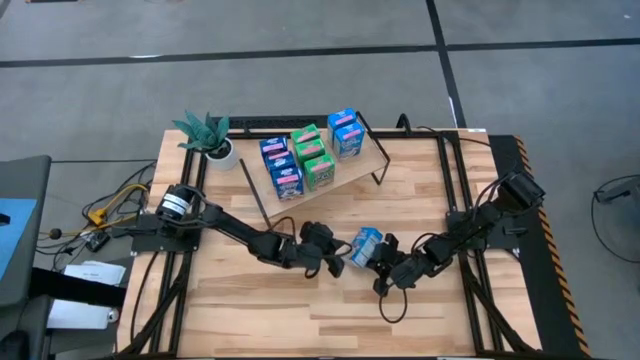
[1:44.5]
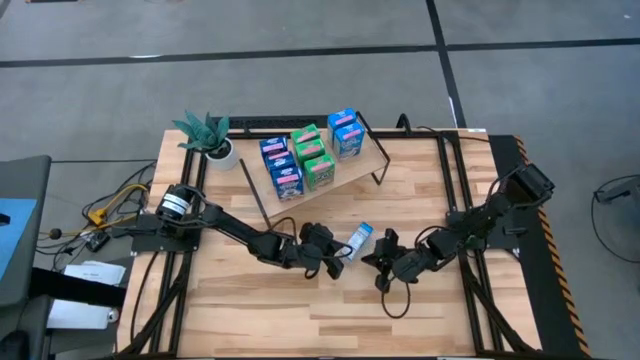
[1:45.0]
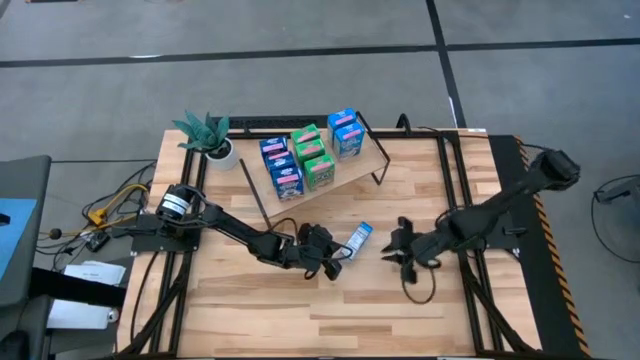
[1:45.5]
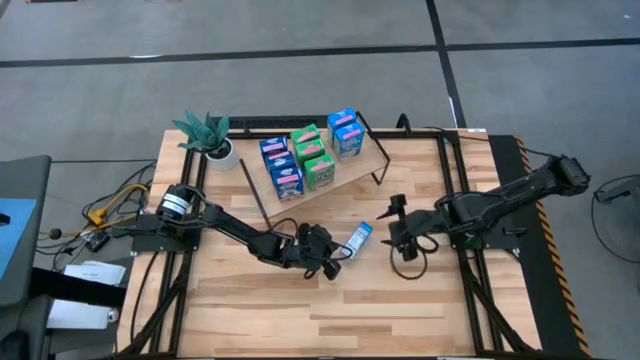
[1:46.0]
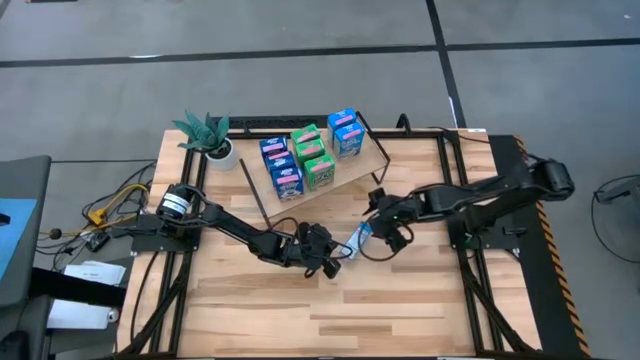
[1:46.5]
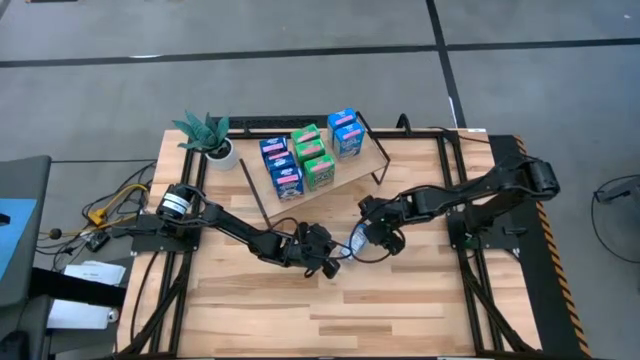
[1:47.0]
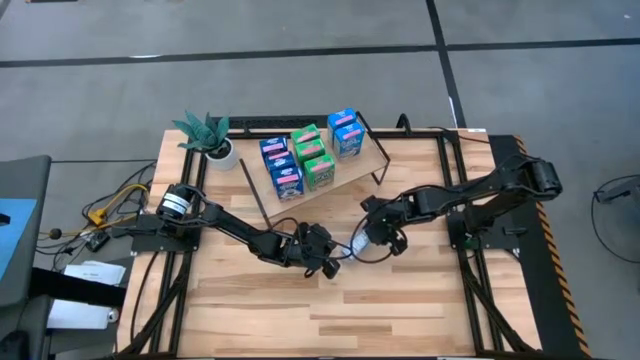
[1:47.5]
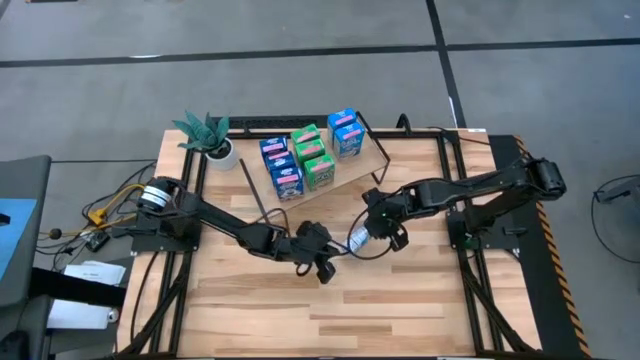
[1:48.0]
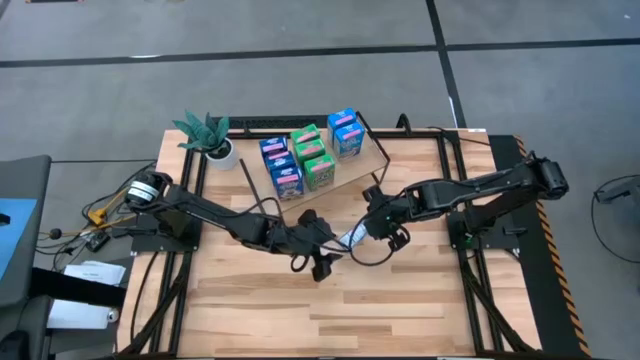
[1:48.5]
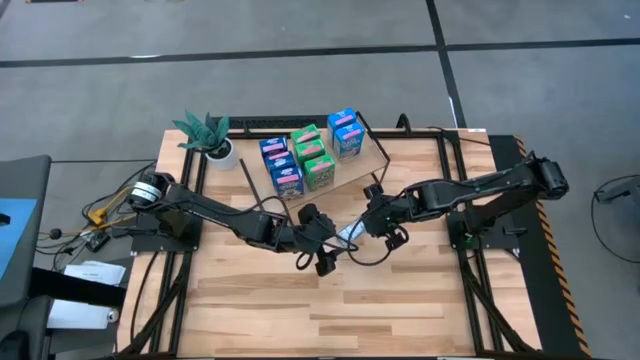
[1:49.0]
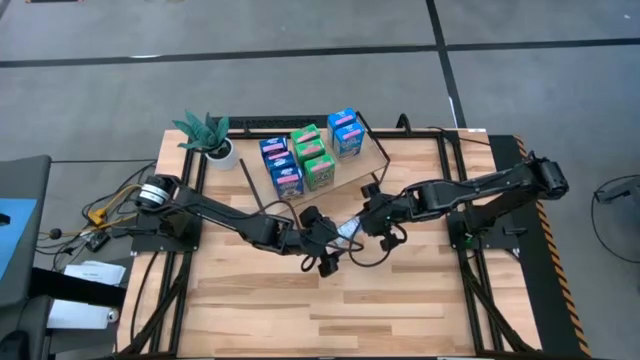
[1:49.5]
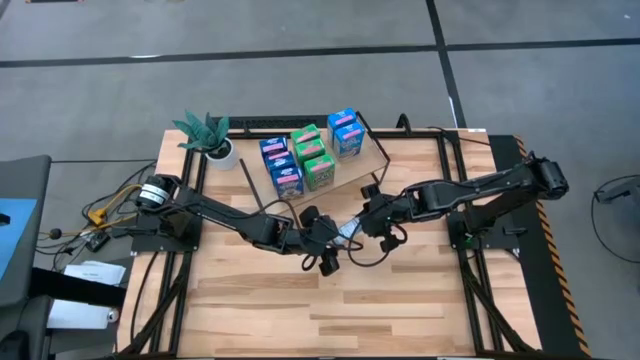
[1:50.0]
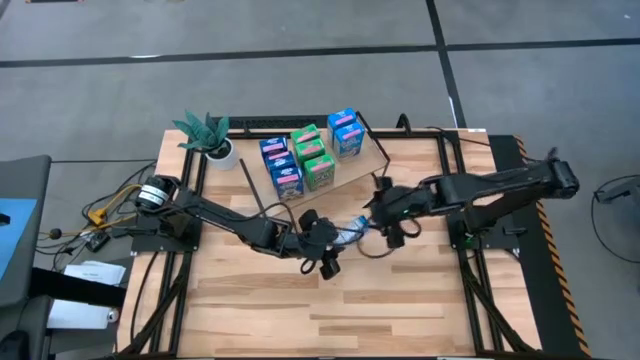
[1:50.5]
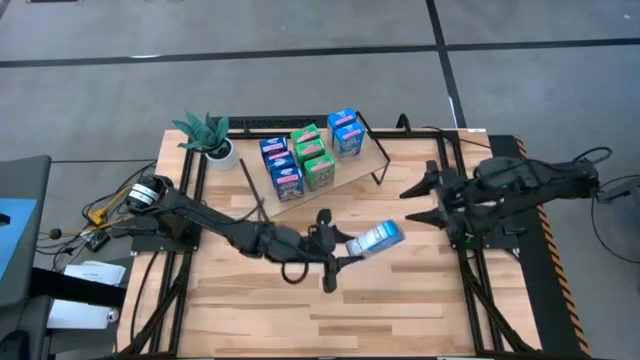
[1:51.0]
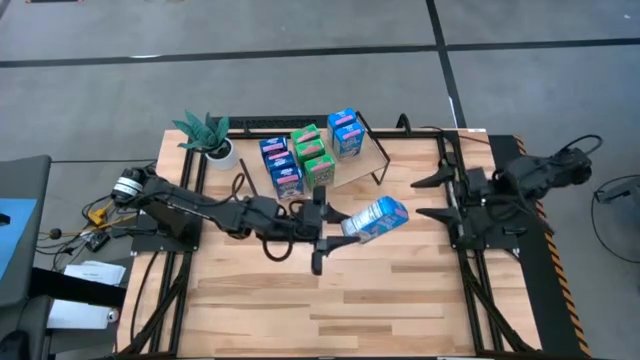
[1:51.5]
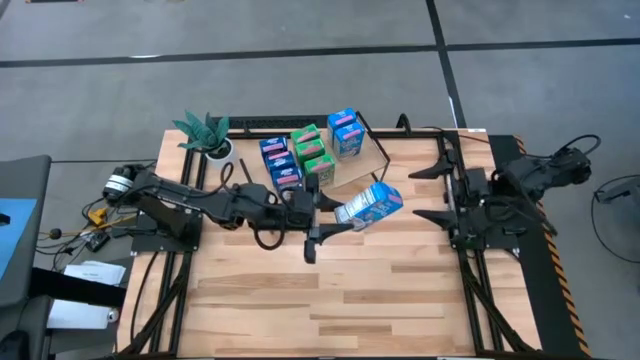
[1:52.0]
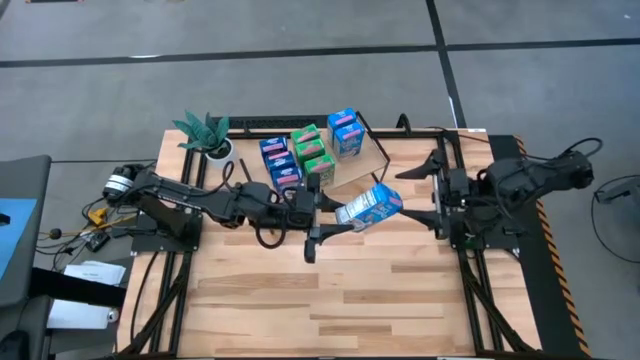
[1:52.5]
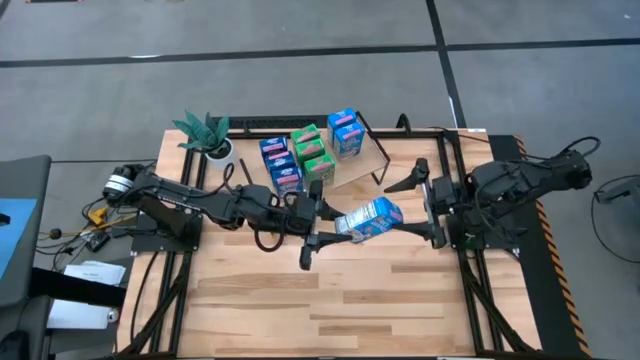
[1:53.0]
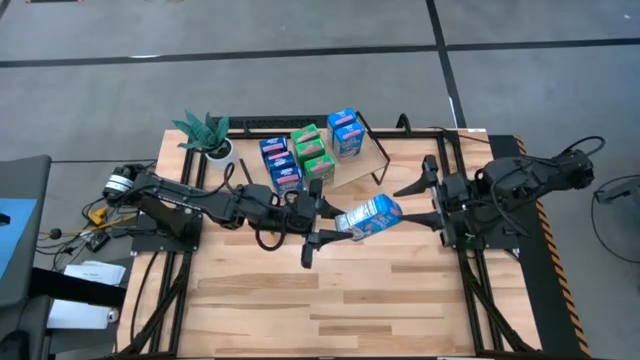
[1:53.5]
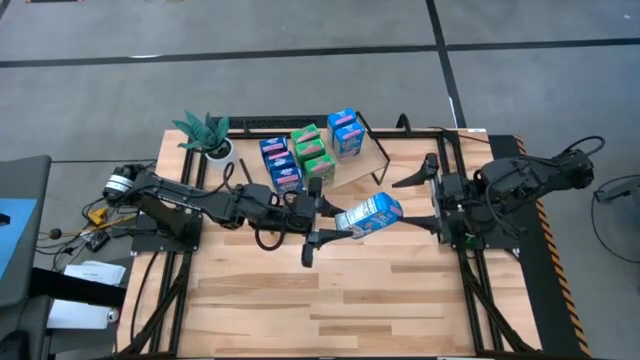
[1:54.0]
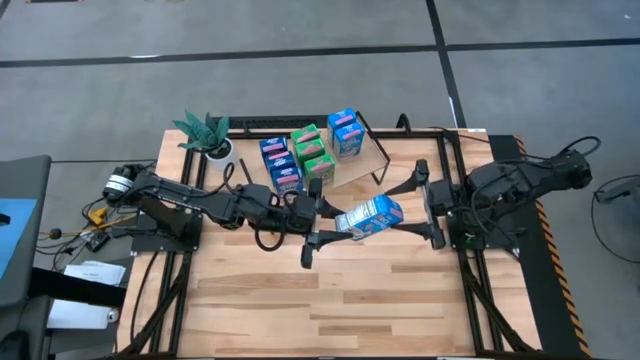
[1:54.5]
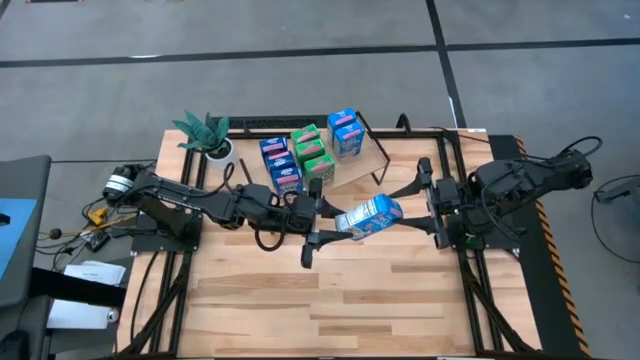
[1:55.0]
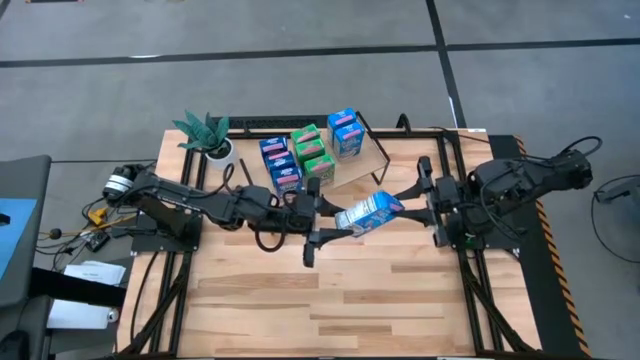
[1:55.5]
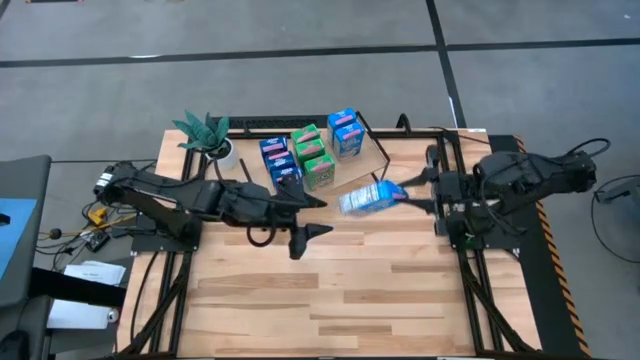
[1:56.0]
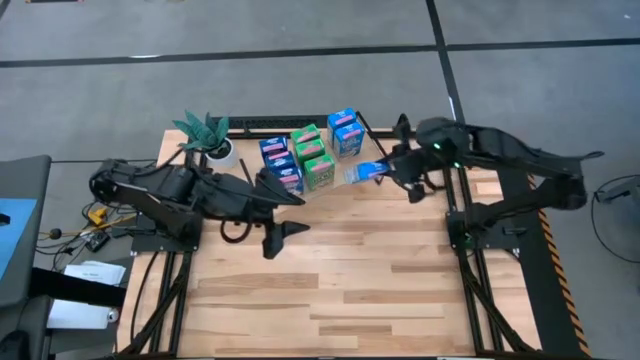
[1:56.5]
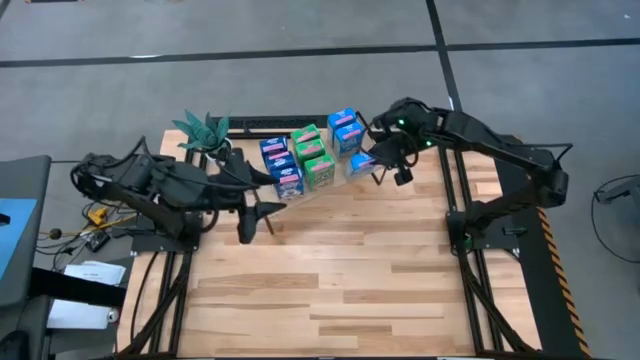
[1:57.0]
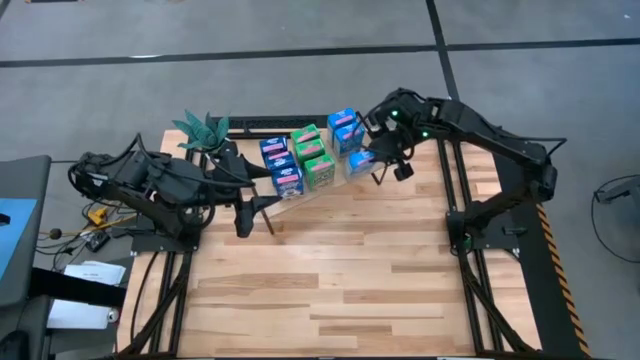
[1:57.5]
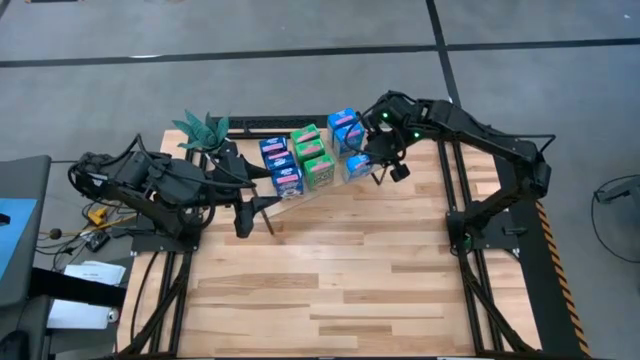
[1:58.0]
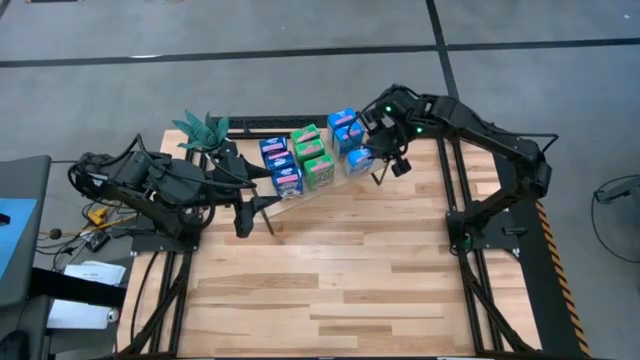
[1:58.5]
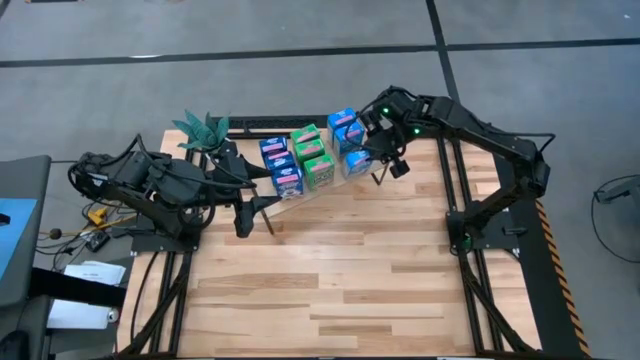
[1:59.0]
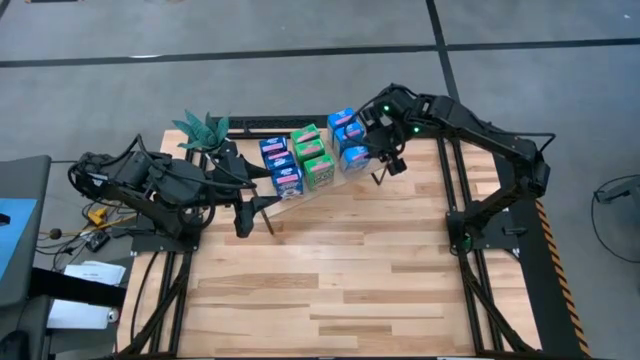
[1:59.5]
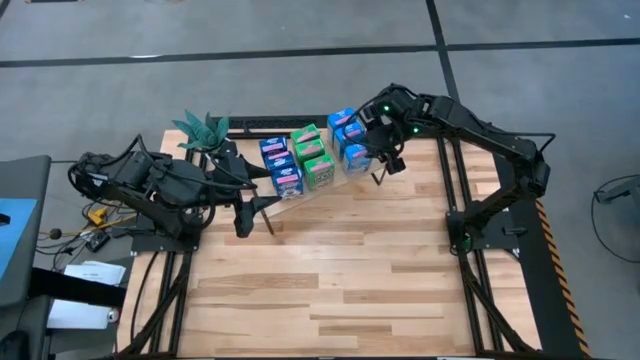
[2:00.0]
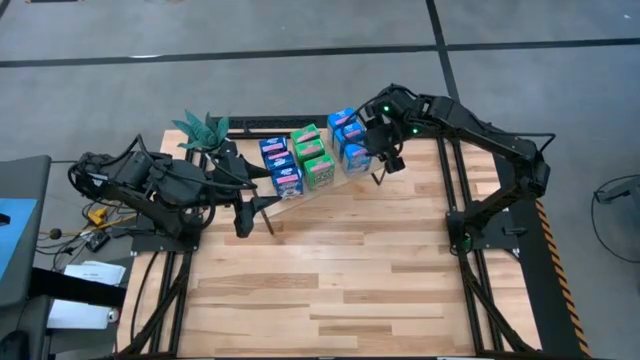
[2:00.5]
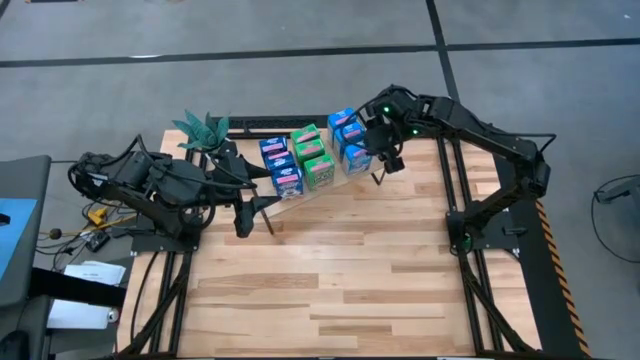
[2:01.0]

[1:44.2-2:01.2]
Task: Stack cereal on shelf
Put the light blue cereal box on the shelf and align it with the other light blue cereal boxes

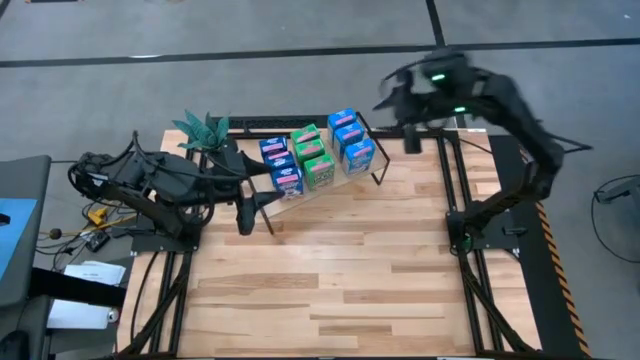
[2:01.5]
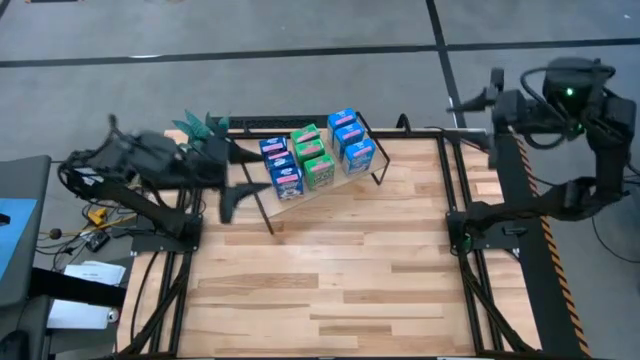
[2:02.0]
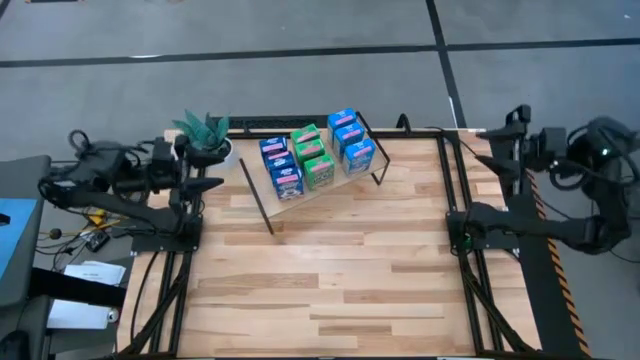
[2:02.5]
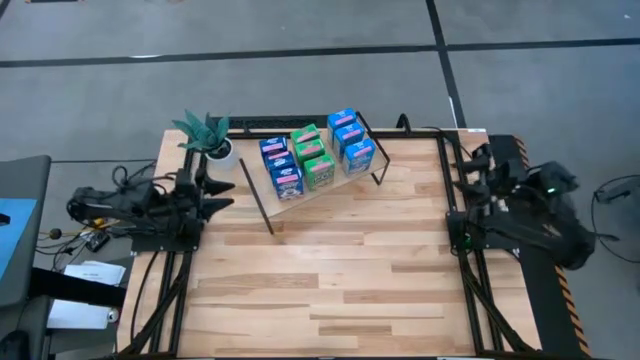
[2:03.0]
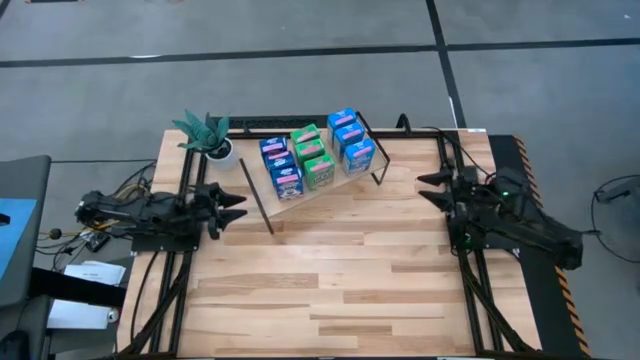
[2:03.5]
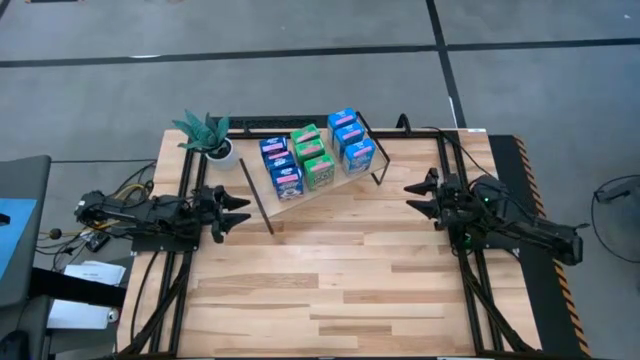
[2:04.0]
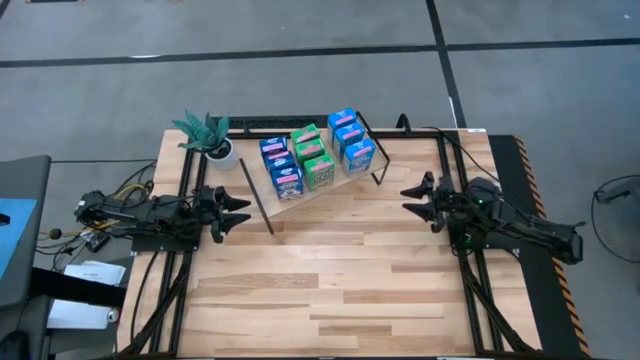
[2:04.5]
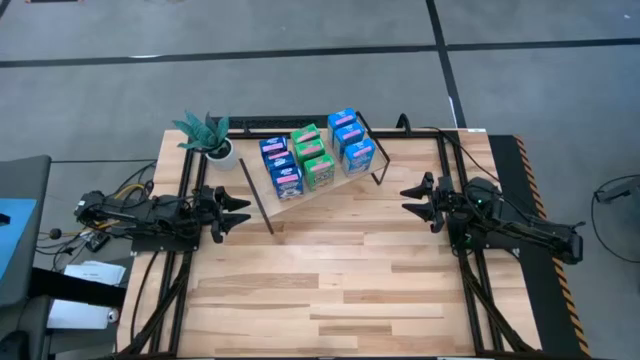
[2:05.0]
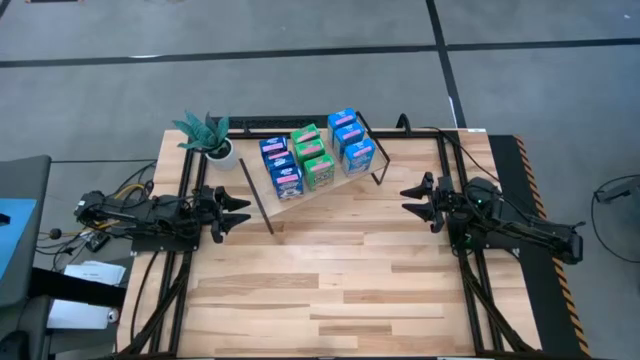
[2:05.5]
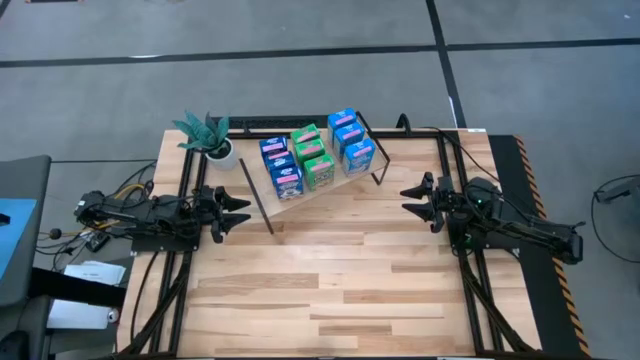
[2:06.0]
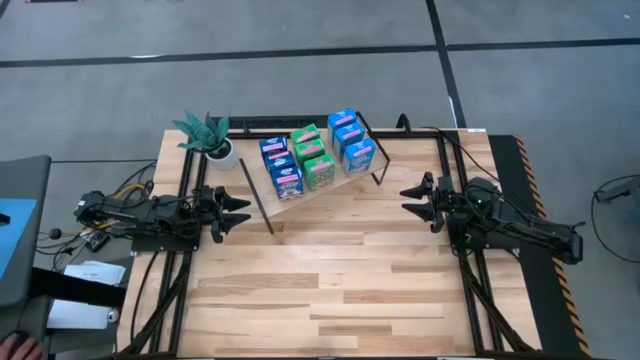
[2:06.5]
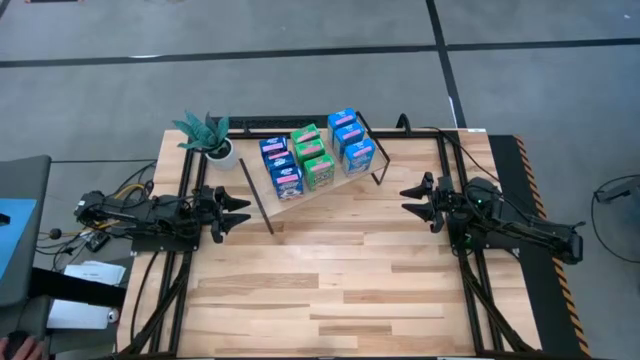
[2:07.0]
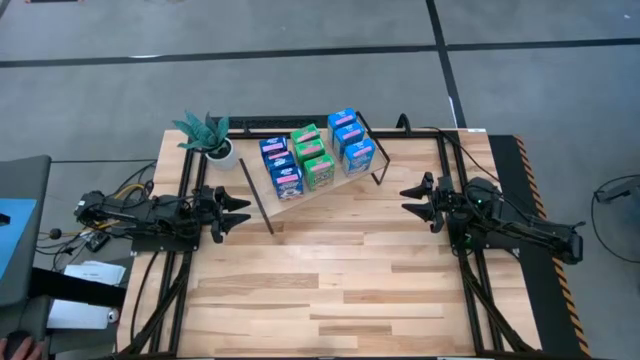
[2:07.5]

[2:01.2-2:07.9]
Return to Home Position
